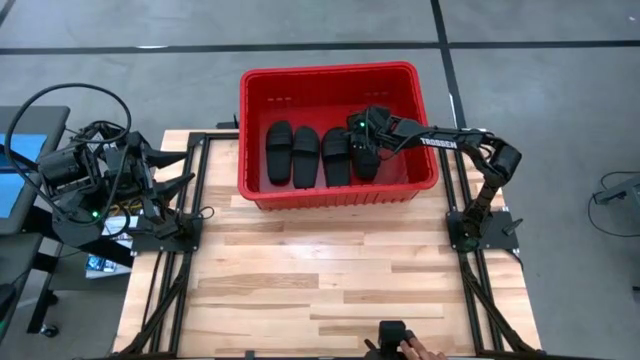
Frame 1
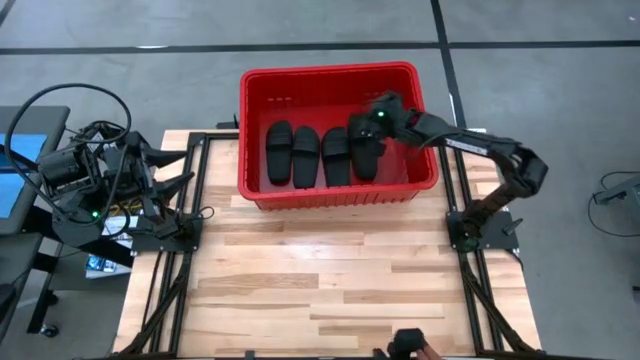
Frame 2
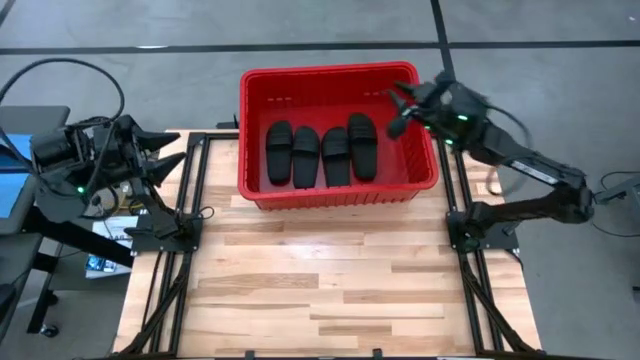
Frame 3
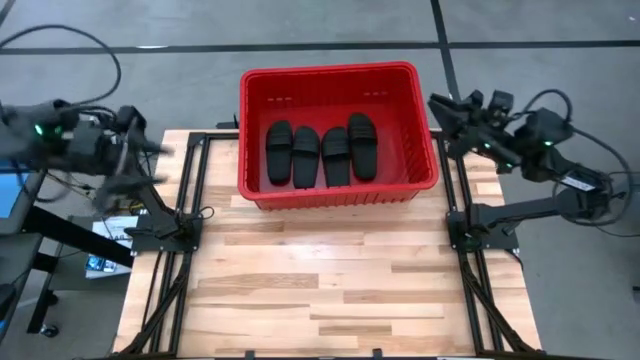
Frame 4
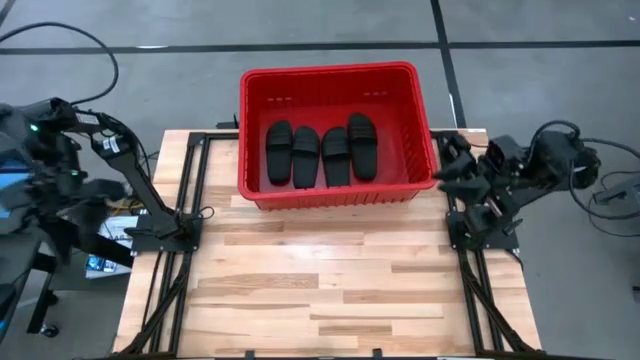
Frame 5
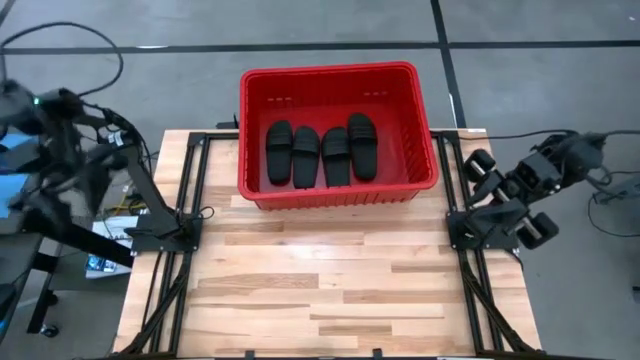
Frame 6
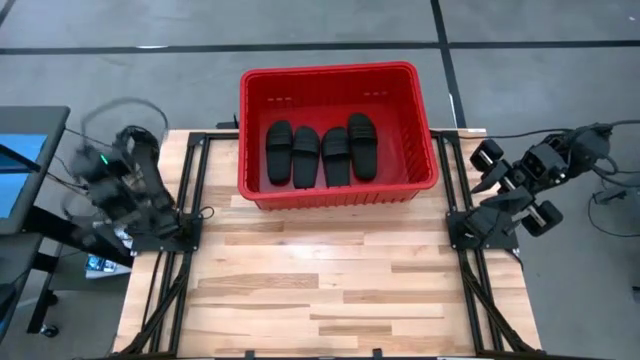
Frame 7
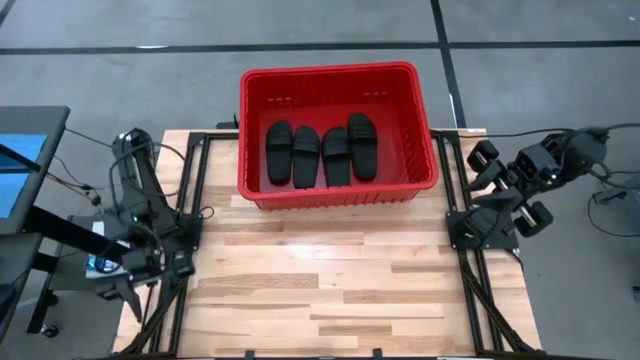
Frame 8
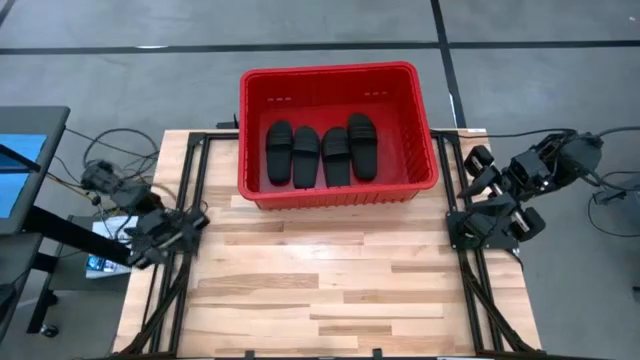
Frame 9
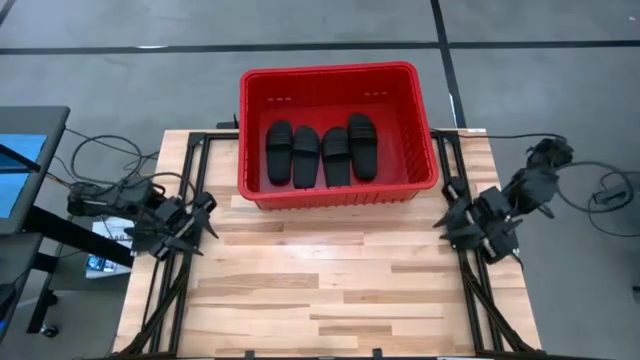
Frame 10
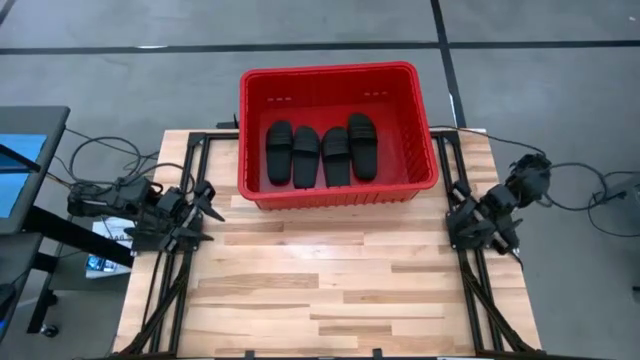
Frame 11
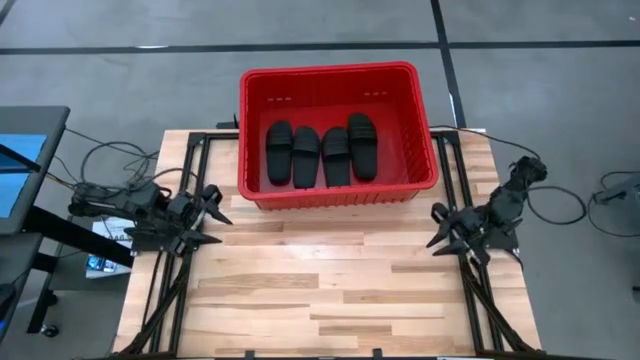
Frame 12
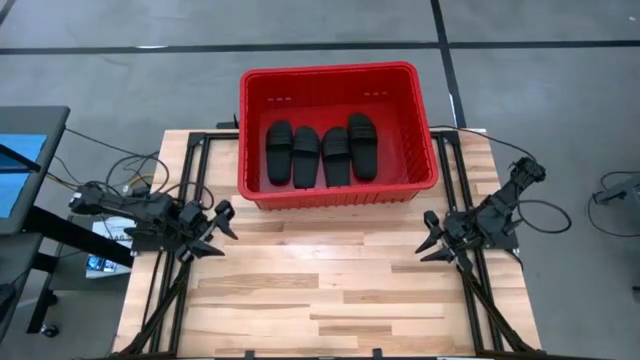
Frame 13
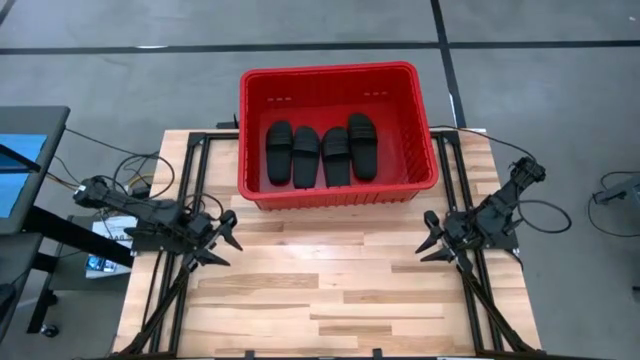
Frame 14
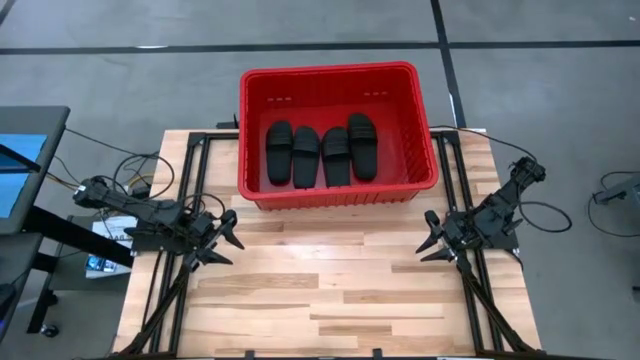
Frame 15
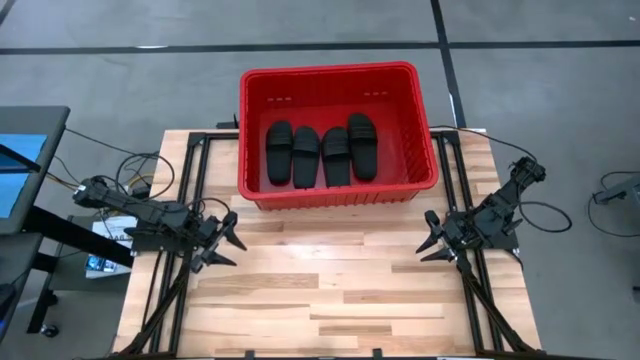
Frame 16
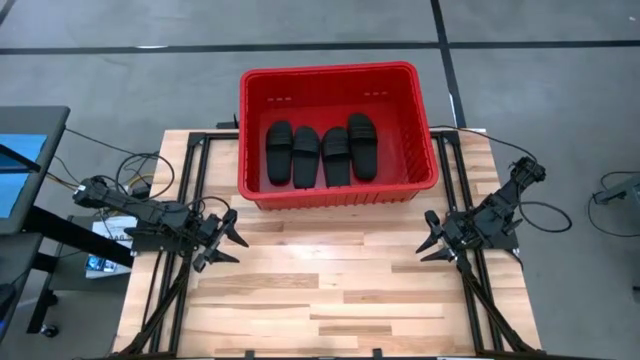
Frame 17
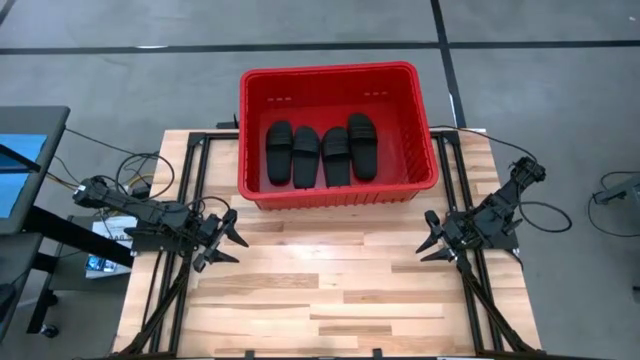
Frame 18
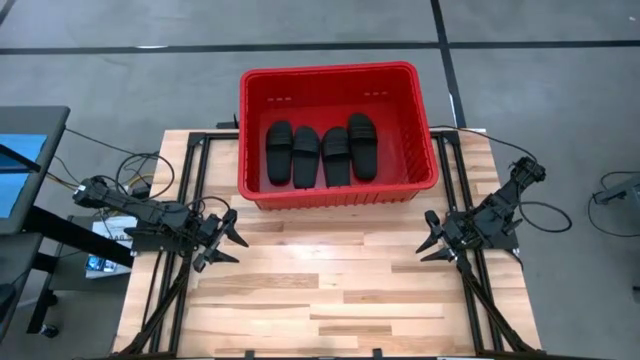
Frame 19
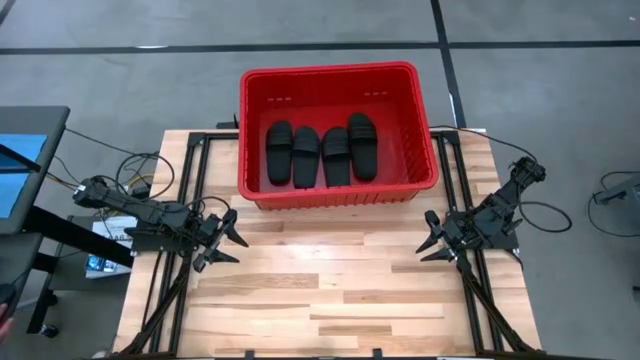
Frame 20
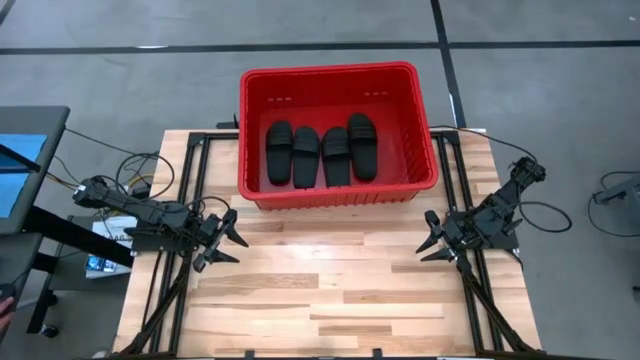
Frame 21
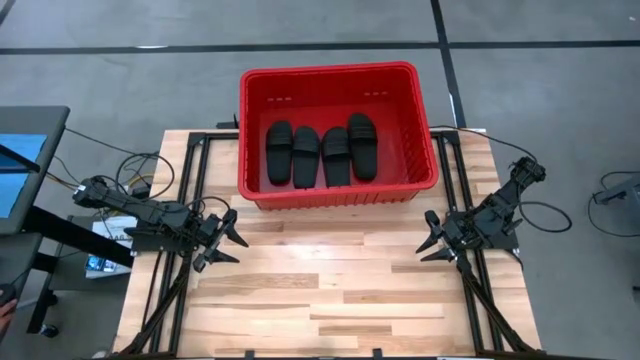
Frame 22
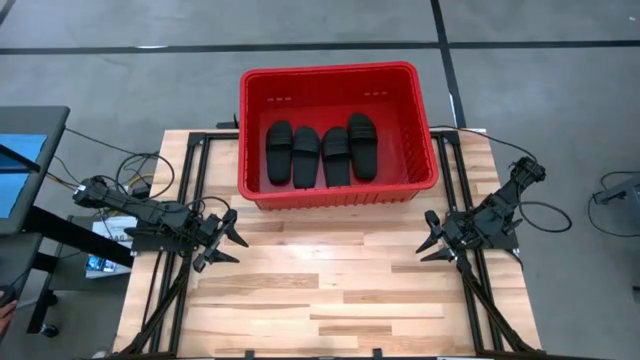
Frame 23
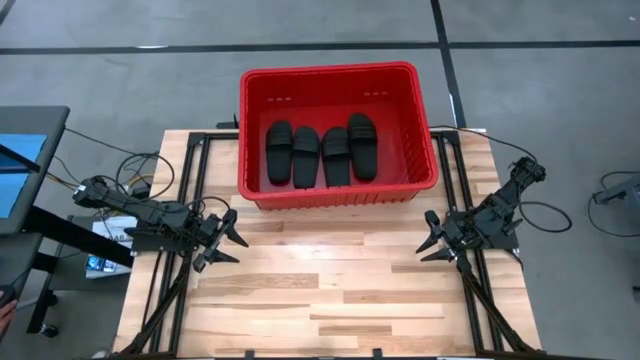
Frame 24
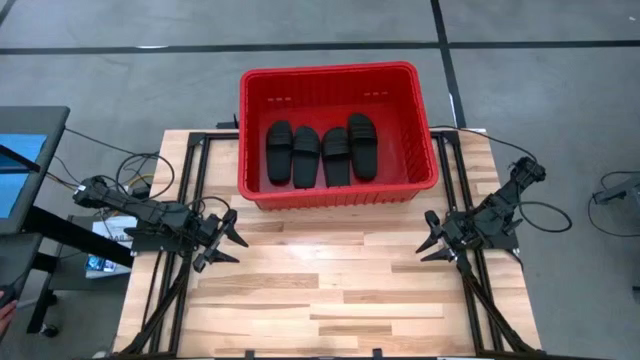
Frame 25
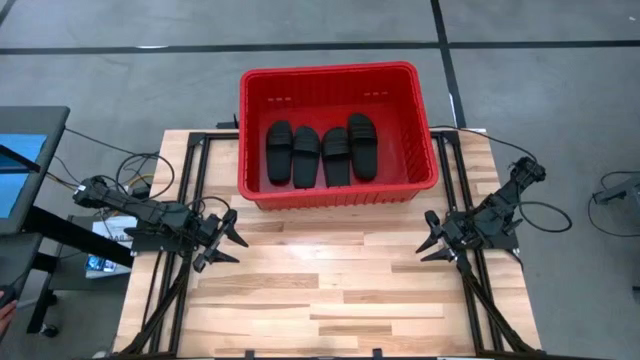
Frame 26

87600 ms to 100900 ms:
Task: Pick and place slides into bin
Return to Home Position
